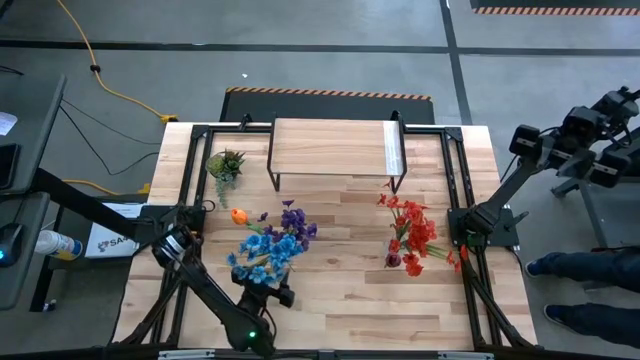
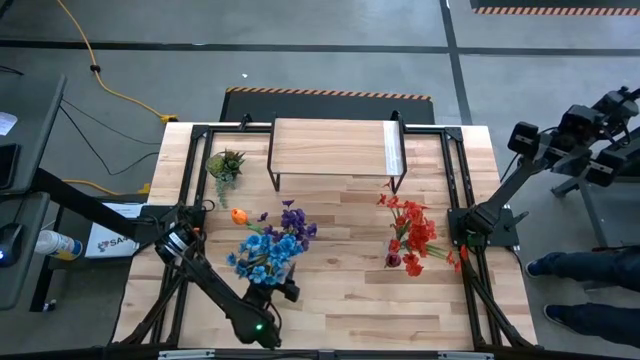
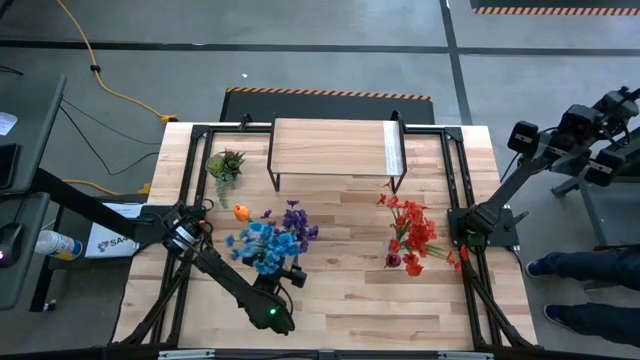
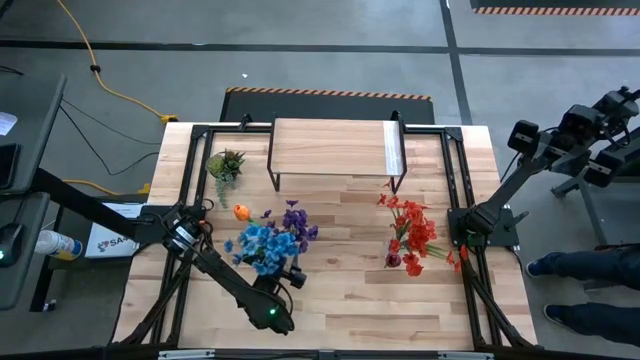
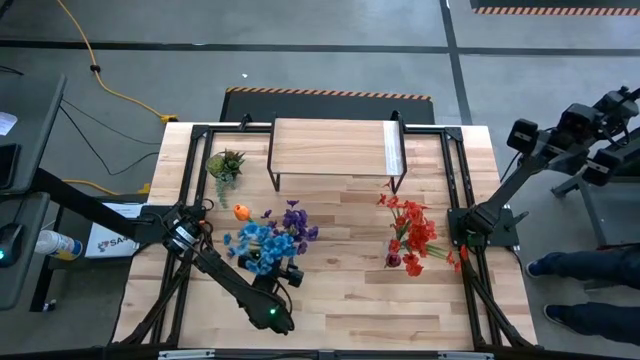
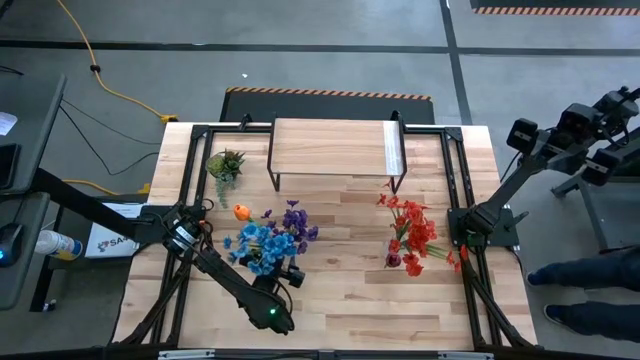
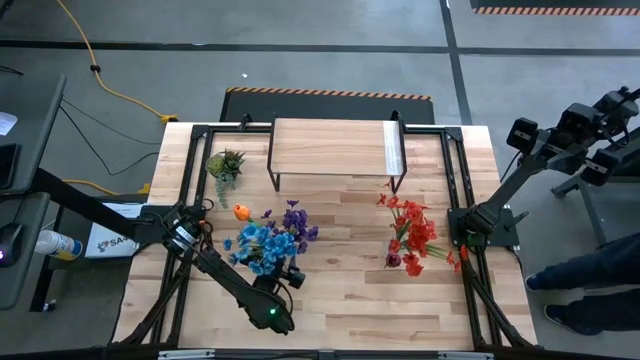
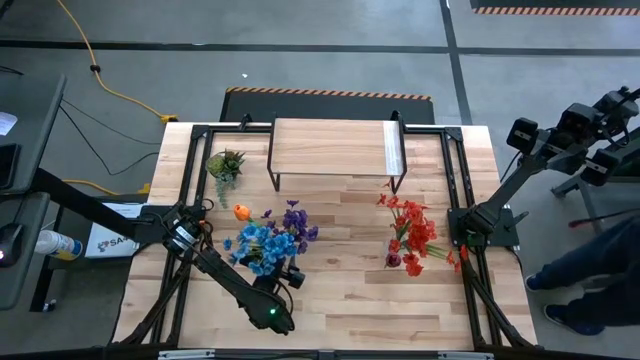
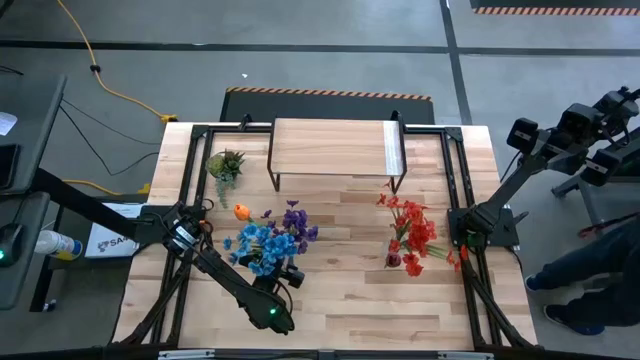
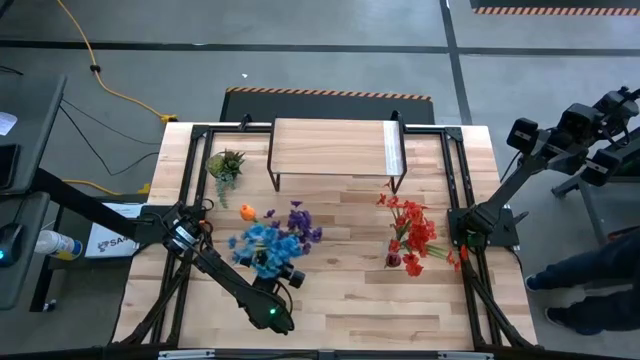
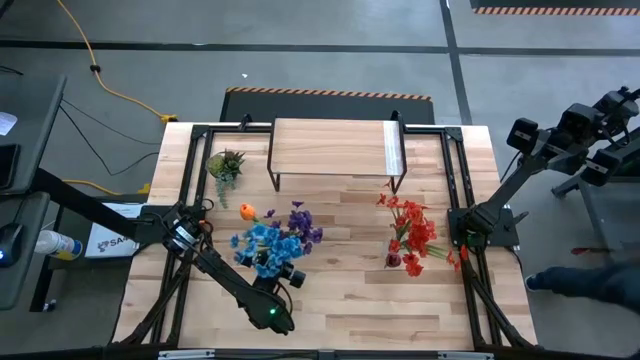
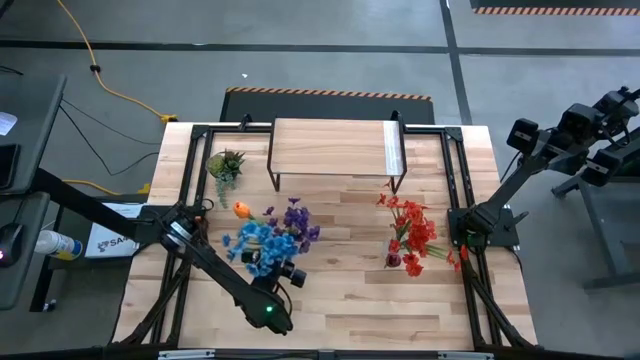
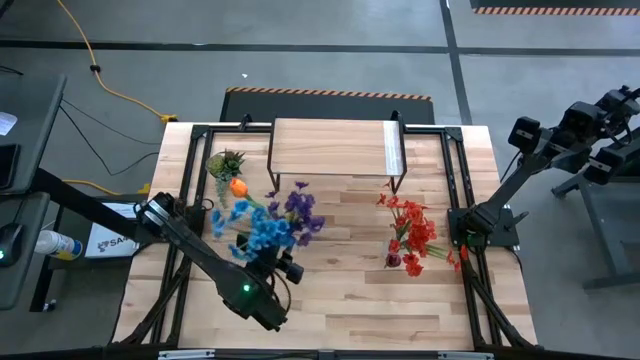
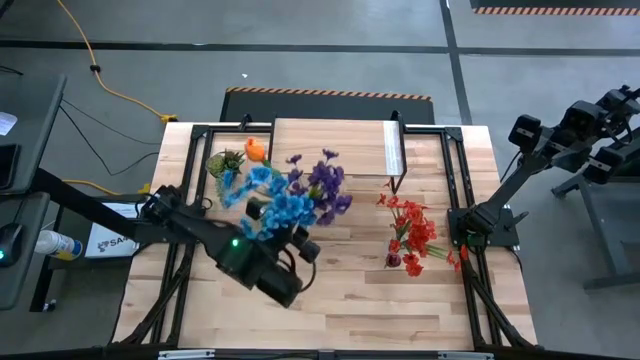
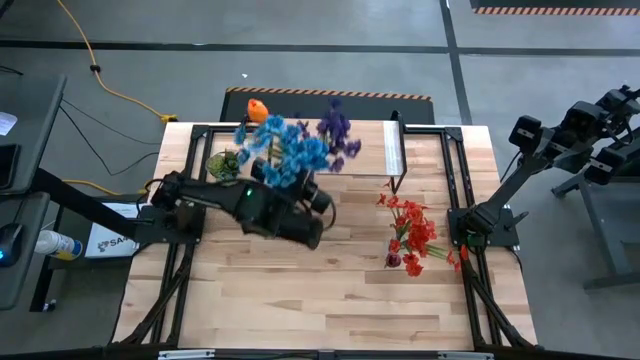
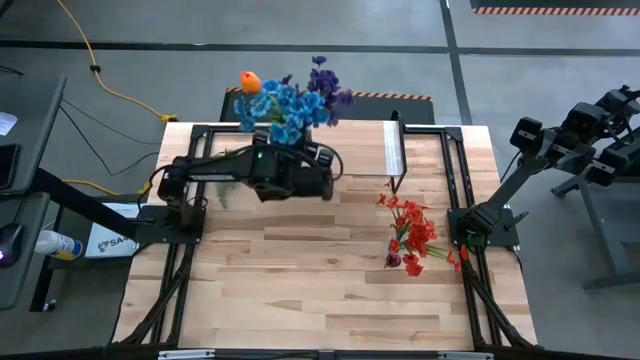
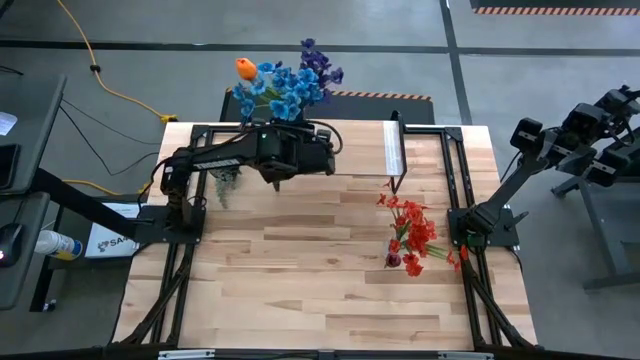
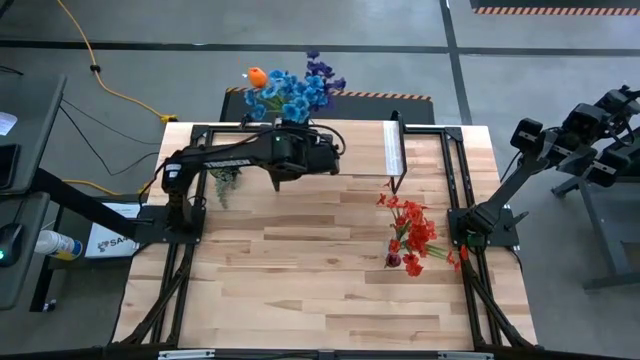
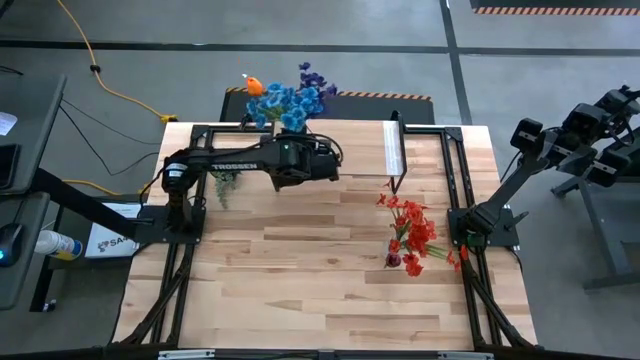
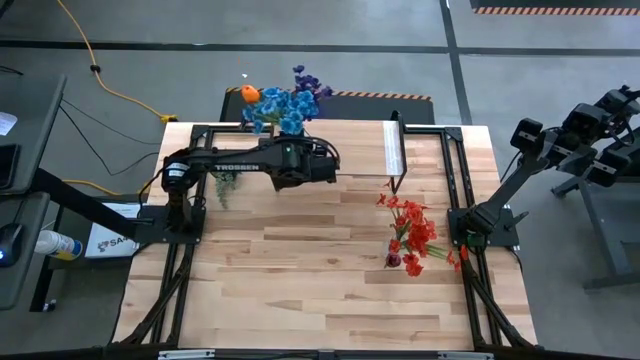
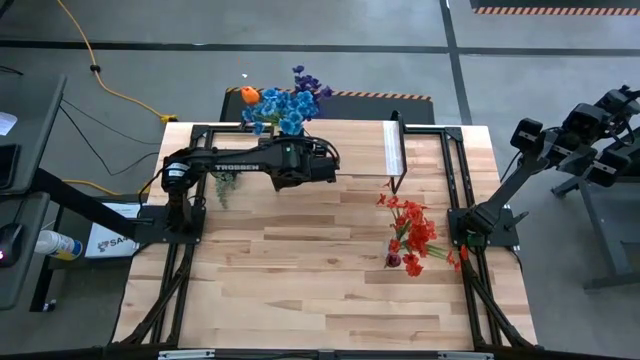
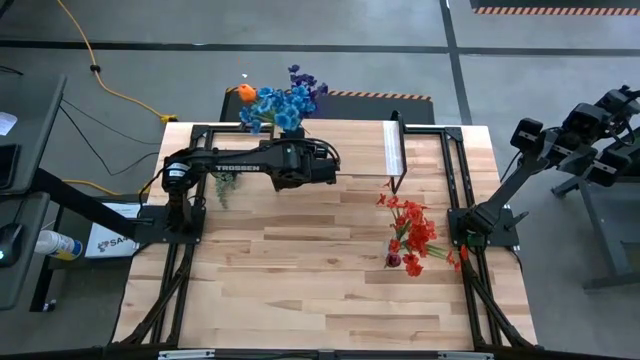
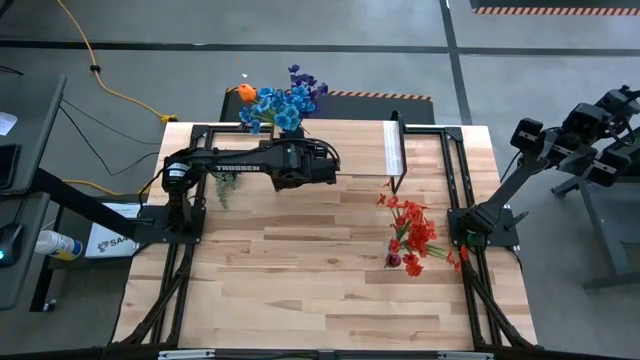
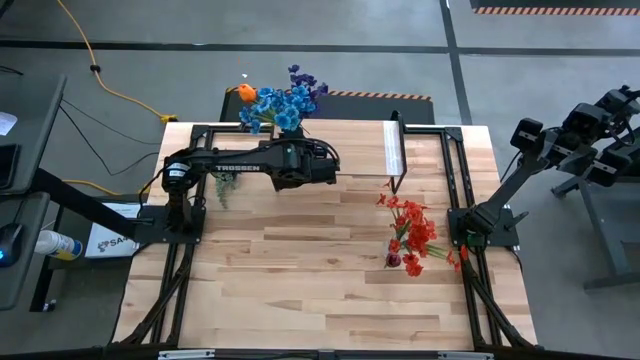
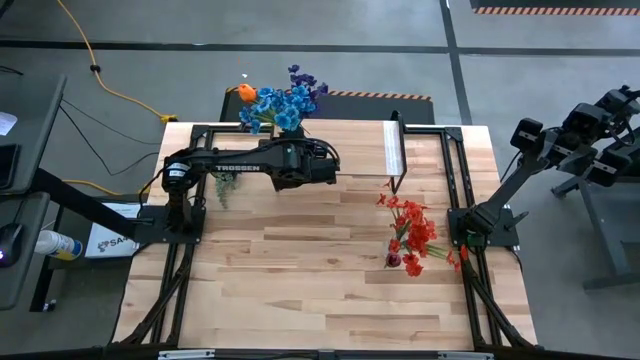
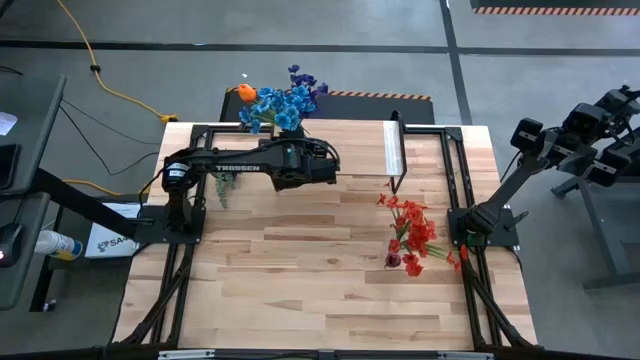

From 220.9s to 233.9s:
Task: Pick and place flowers into a vace then onto a shelf
Put the left flowers transparent vase on the shelf

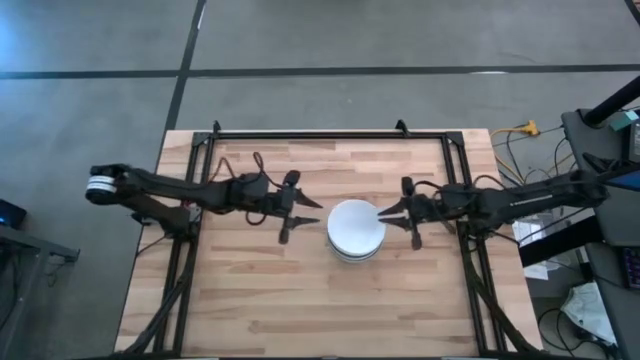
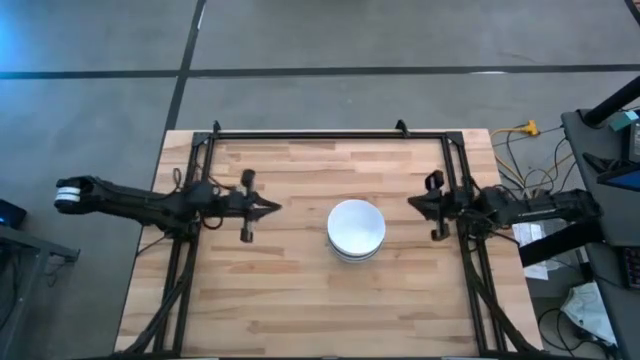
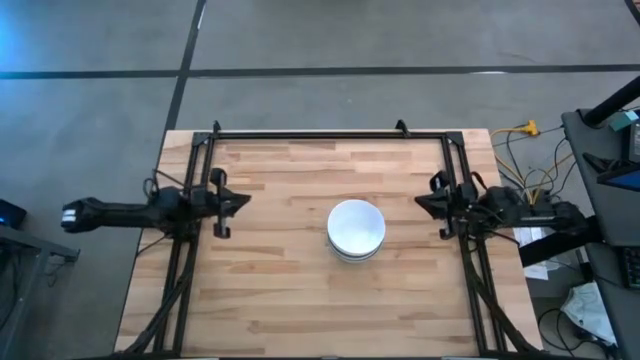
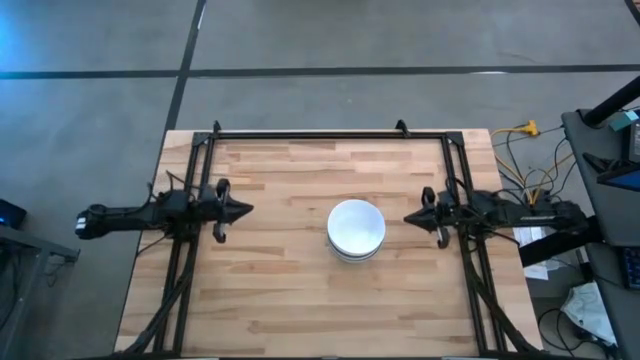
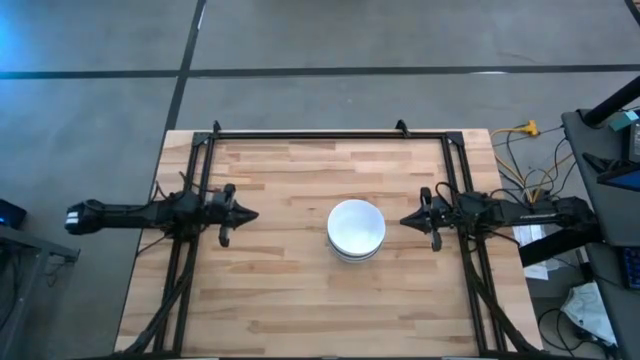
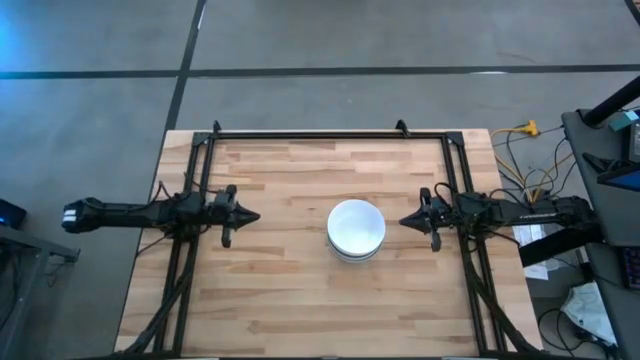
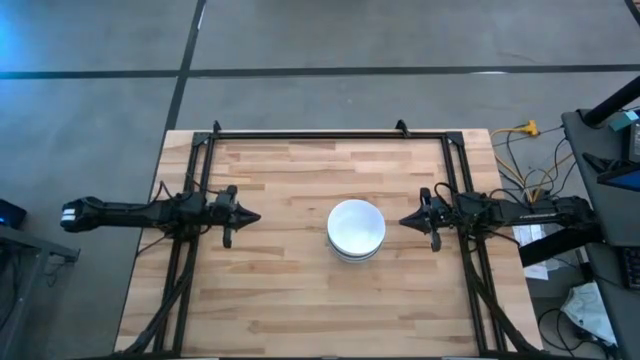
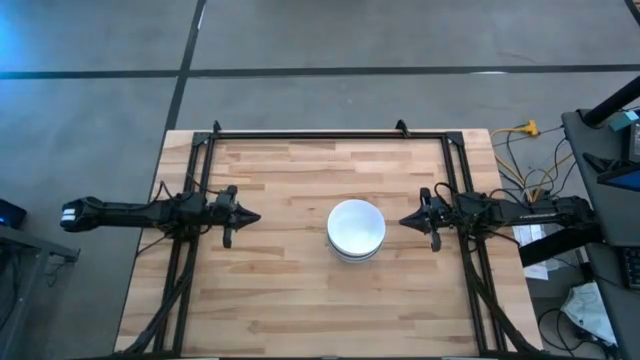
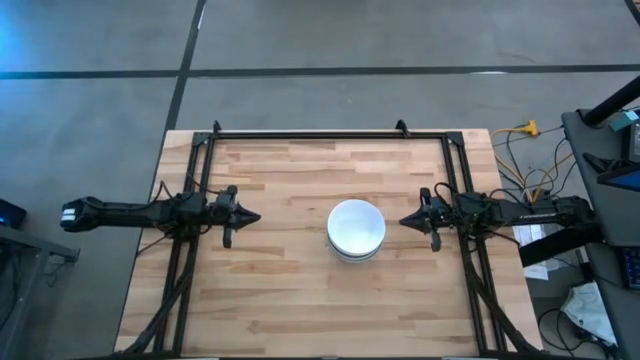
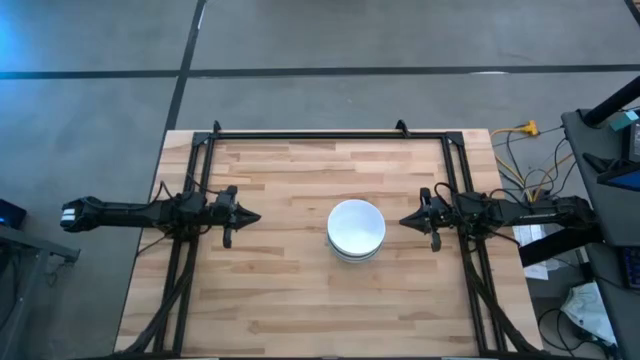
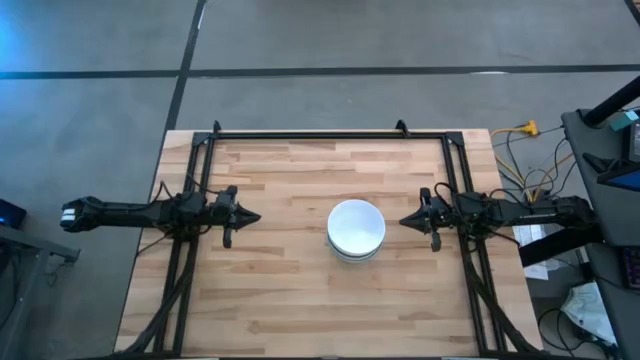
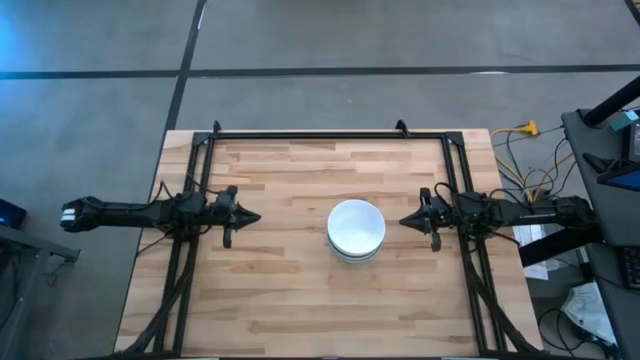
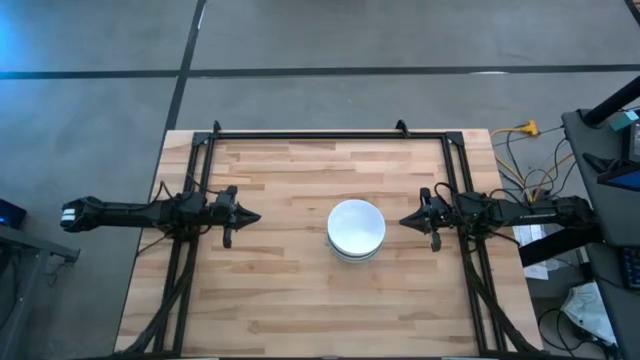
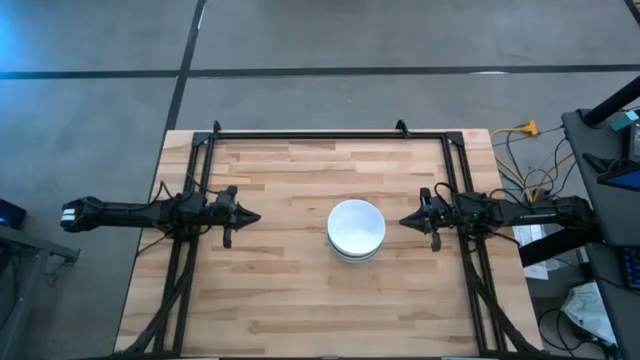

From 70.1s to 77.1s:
Task: Nest bowls inside each other
Return to Home Position

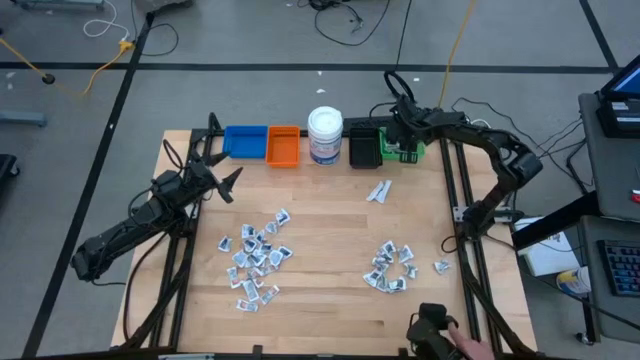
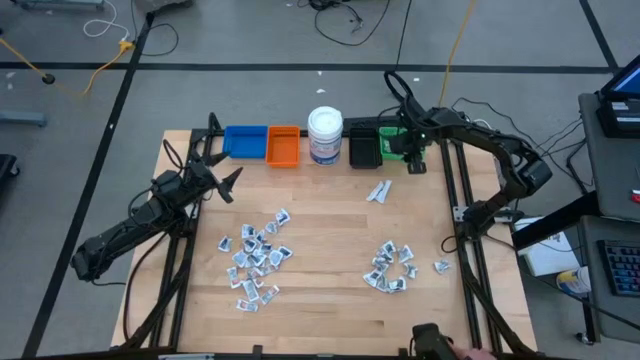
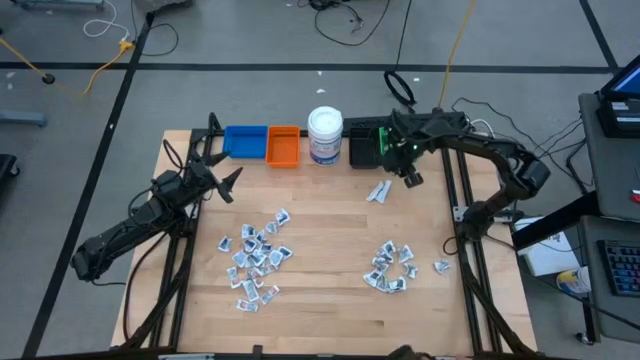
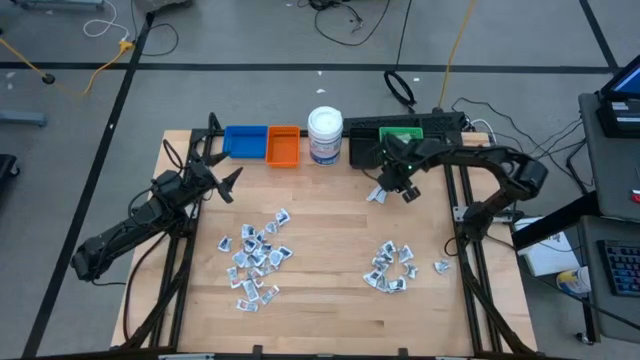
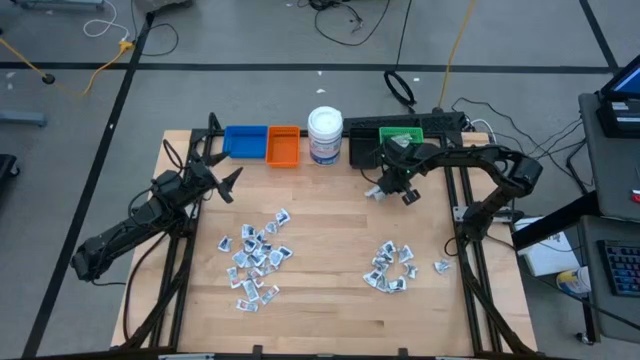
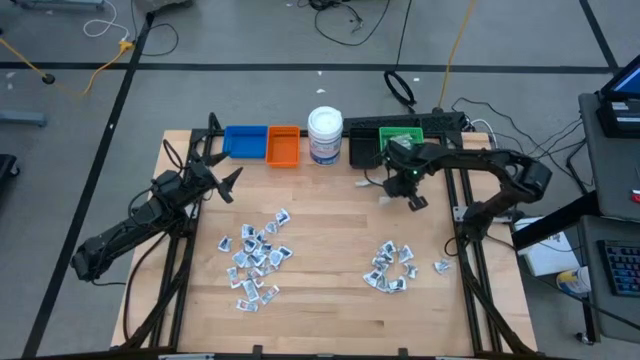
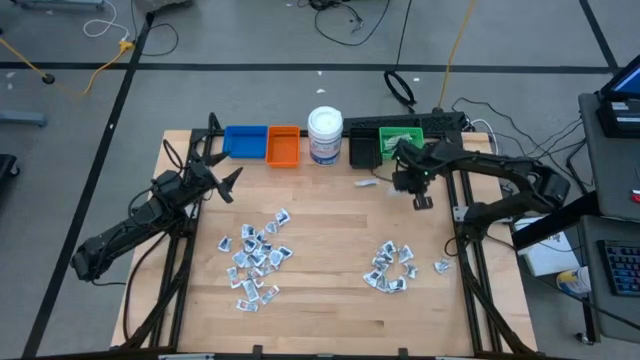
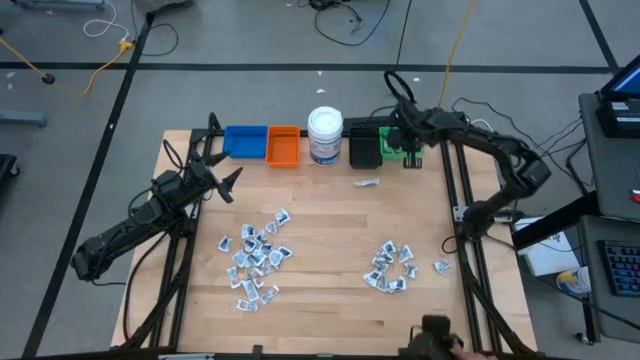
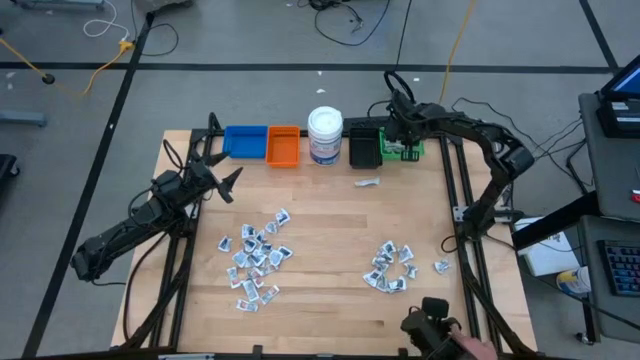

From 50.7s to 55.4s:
Task: Pick & Place First Aid Supplies
Put the bandage into the green bin
